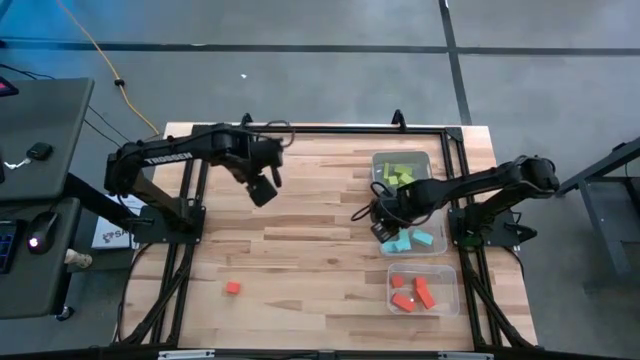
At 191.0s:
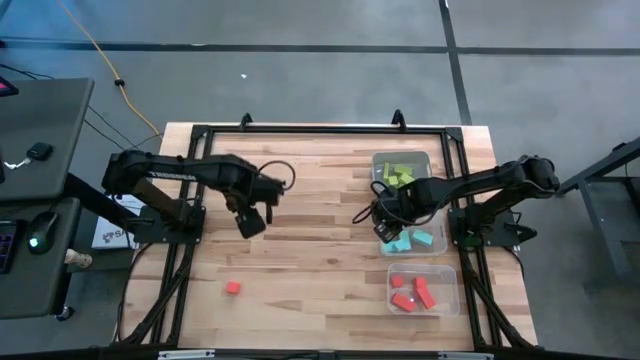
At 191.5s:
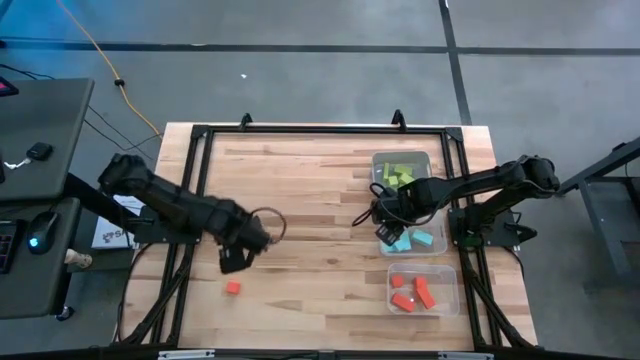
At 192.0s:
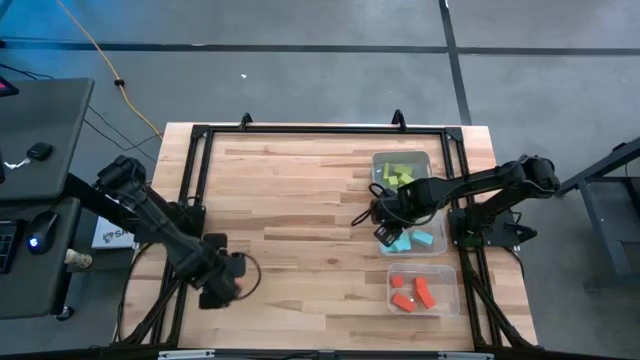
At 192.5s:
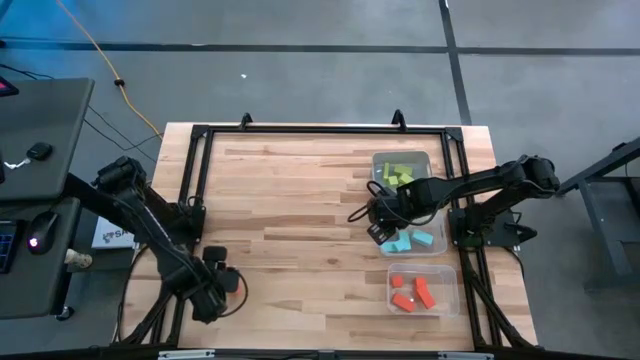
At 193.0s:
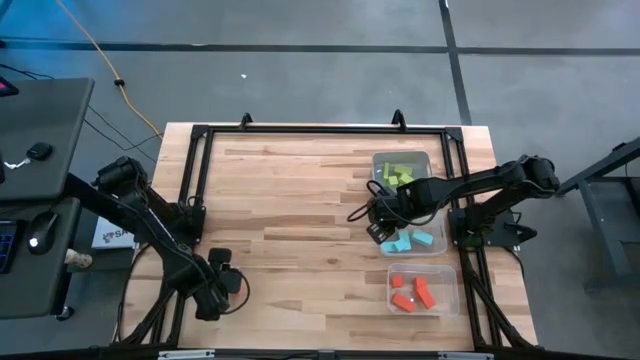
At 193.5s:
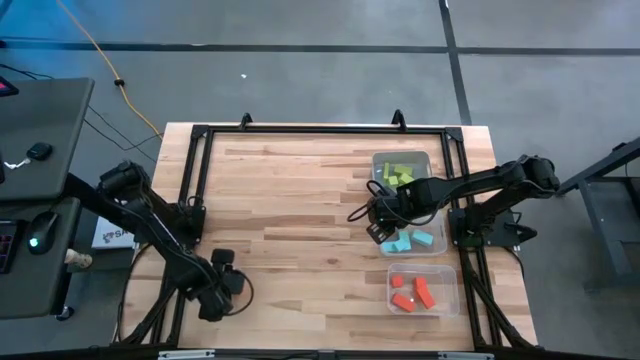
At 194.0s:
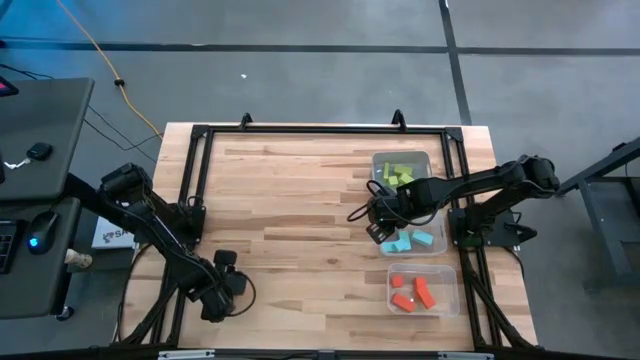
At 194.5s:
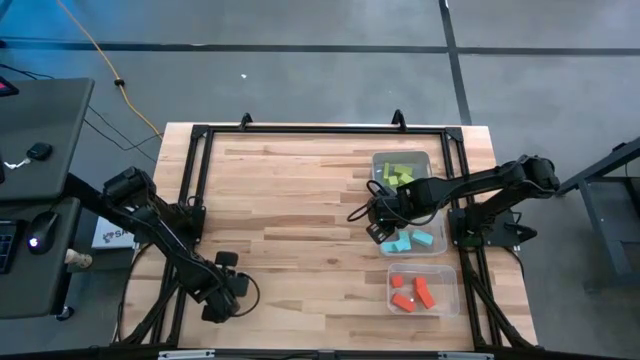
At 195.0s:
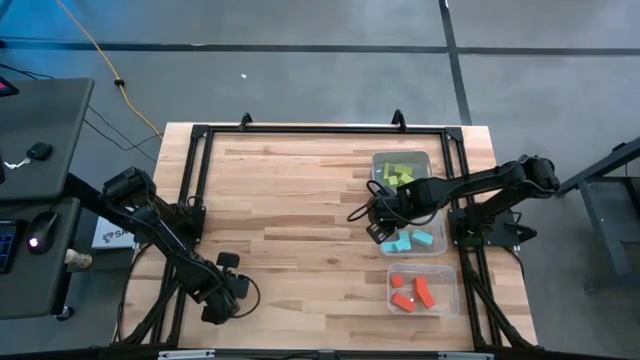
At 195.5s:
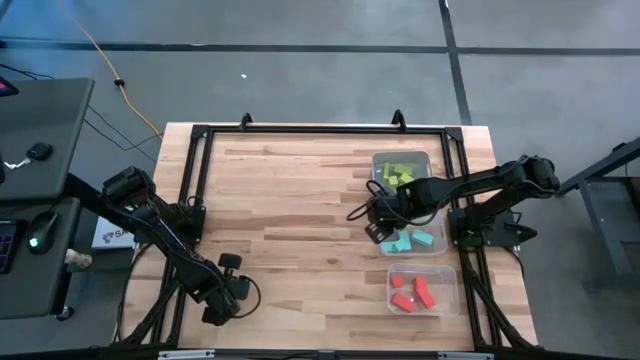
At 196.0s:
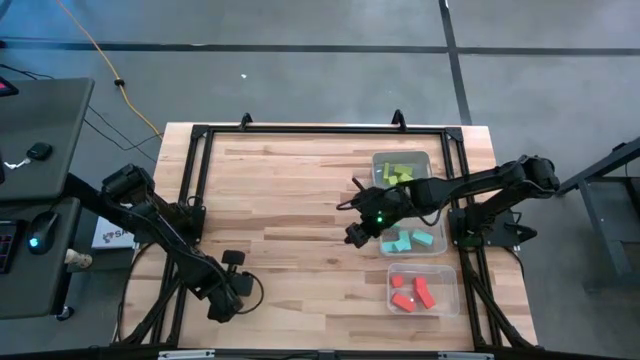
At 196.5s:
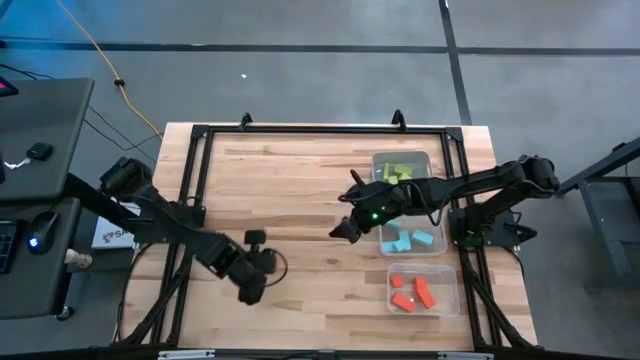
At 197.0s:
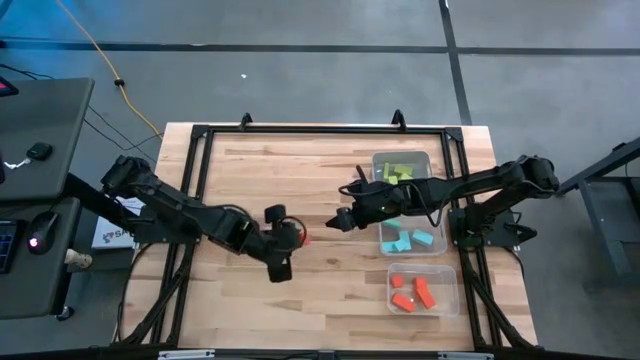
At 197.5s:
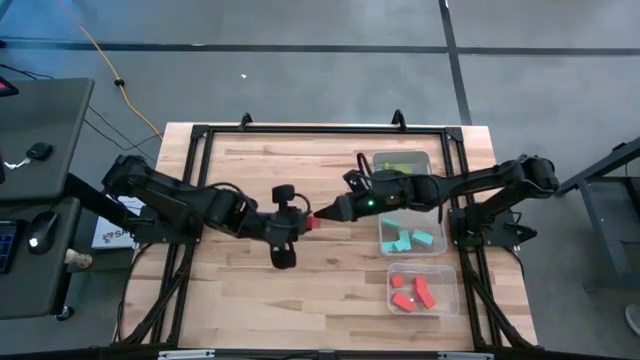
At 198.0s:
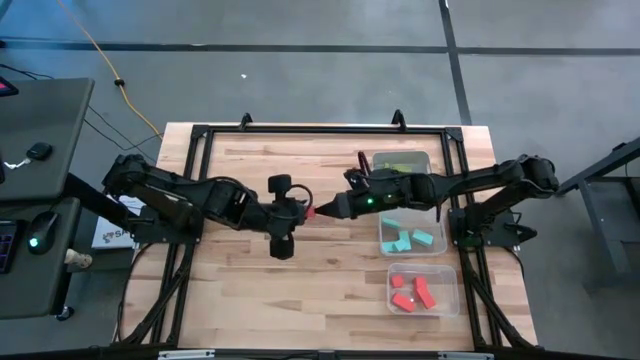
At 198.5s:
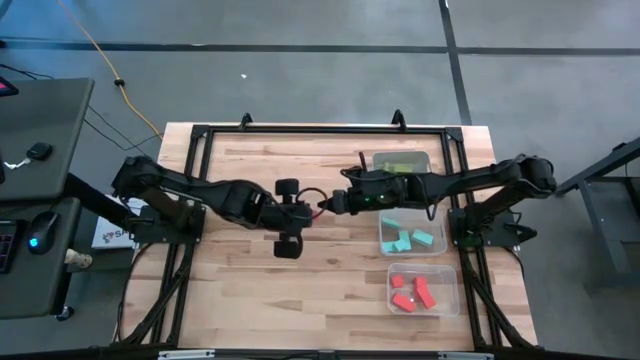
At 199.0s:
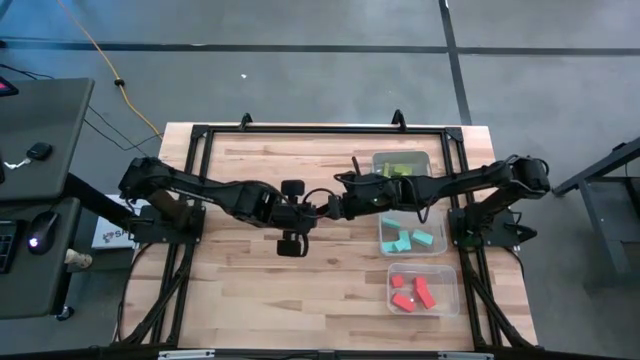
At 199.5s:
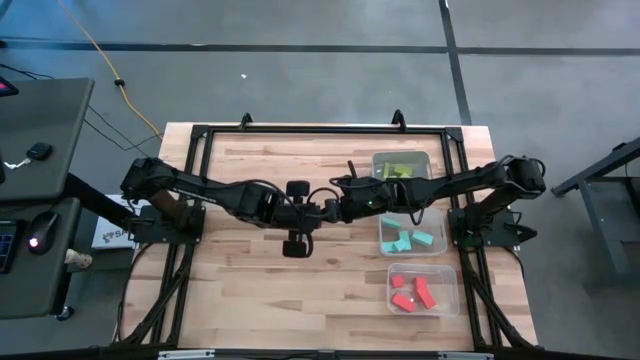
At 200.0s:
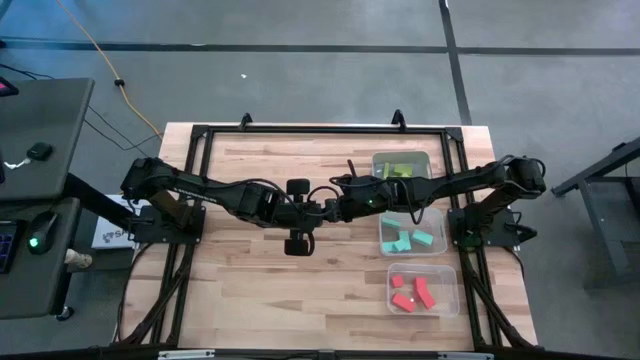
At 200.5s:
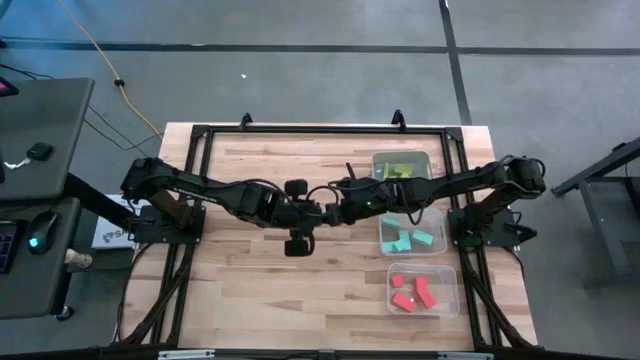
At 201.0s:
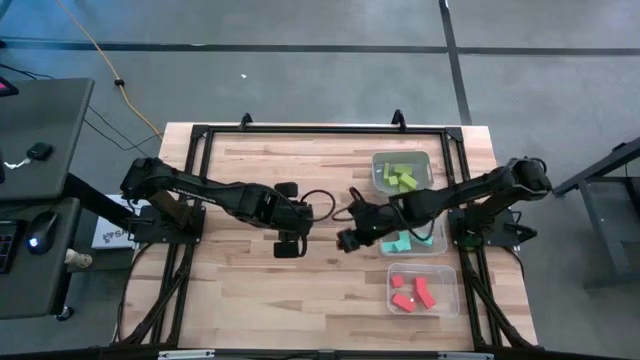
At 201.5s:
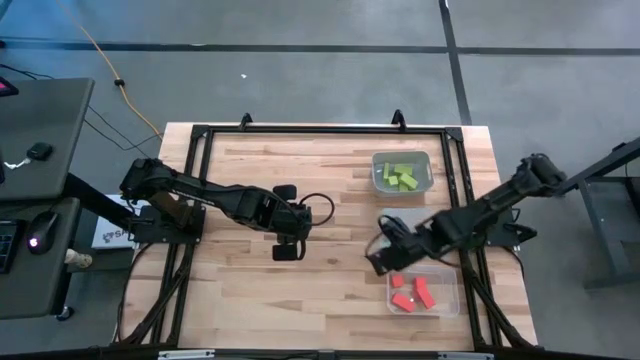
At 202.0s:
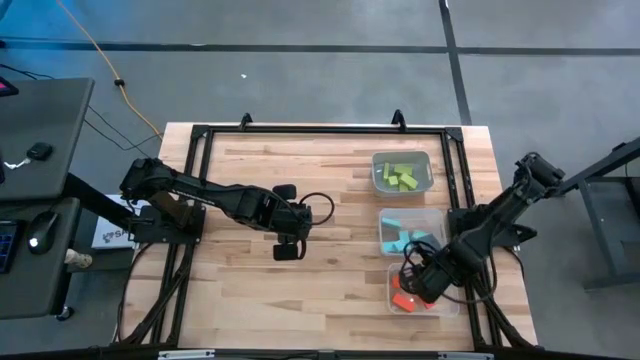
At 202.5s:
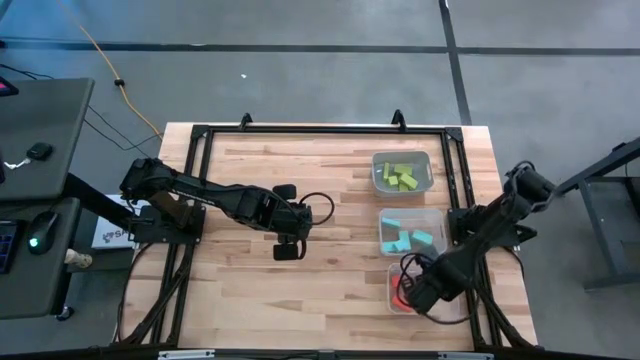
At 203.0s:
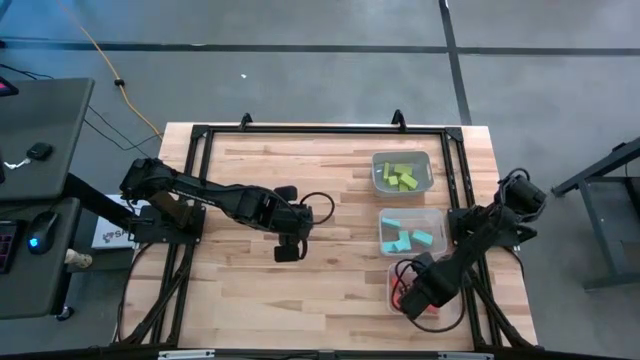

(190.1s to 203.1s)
Task: Sort & place blocks by color
Put the orange block into the bottom transparent bin

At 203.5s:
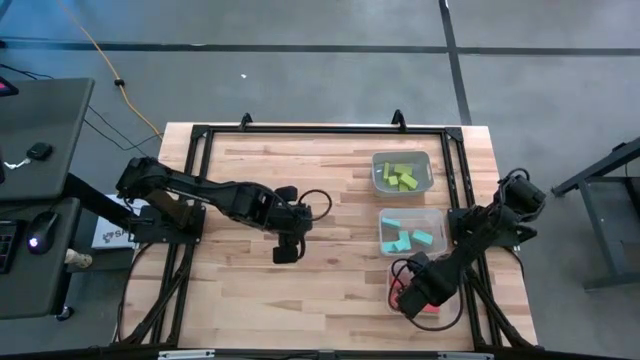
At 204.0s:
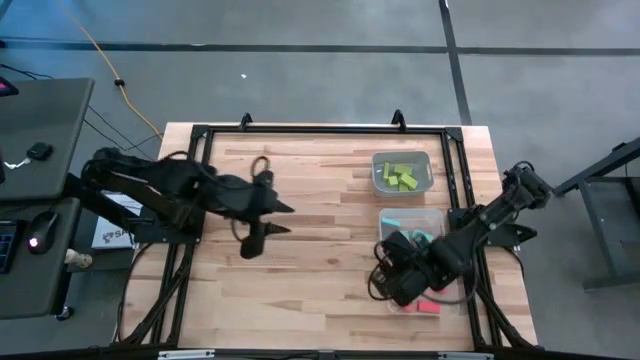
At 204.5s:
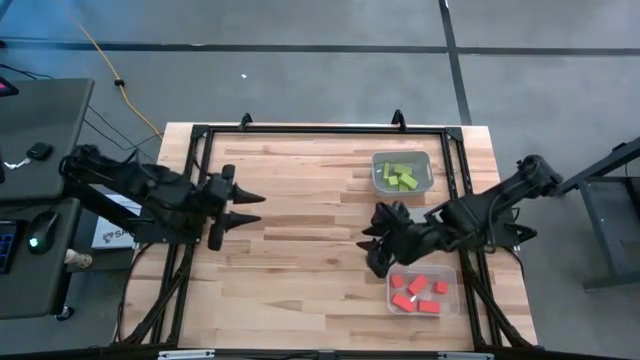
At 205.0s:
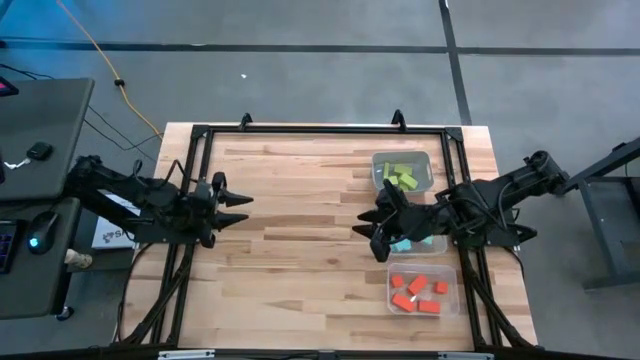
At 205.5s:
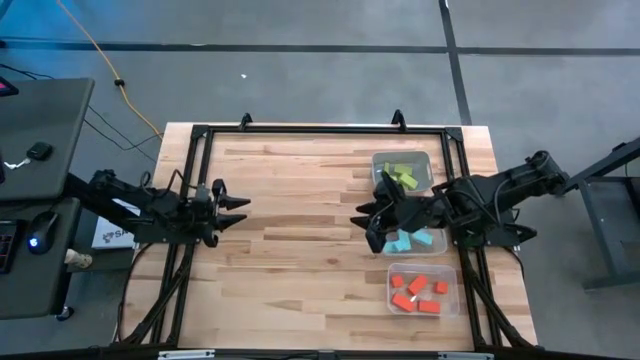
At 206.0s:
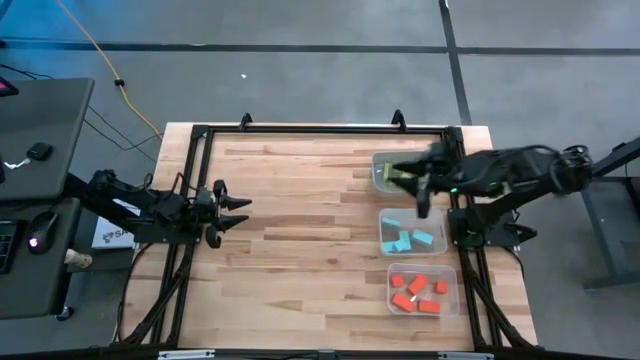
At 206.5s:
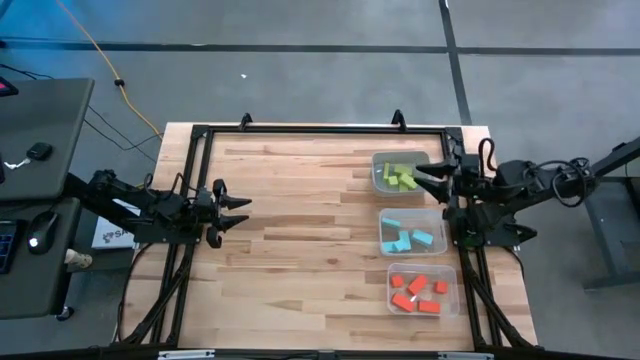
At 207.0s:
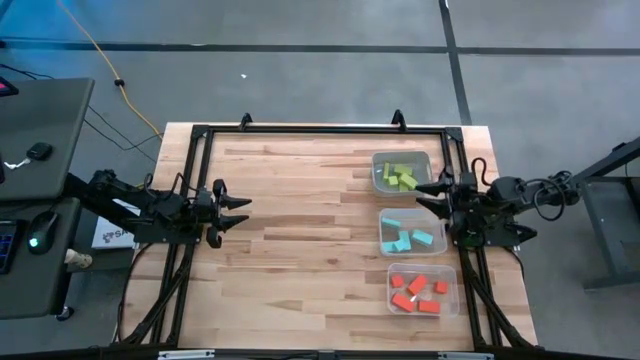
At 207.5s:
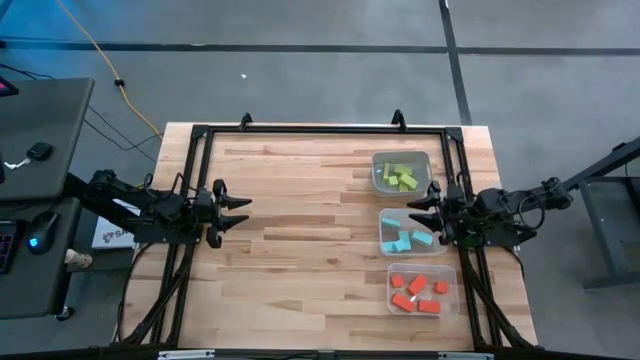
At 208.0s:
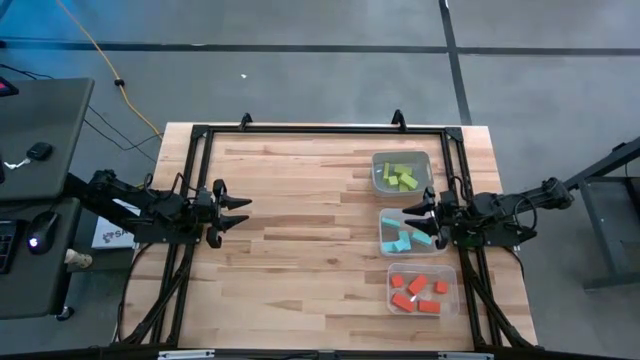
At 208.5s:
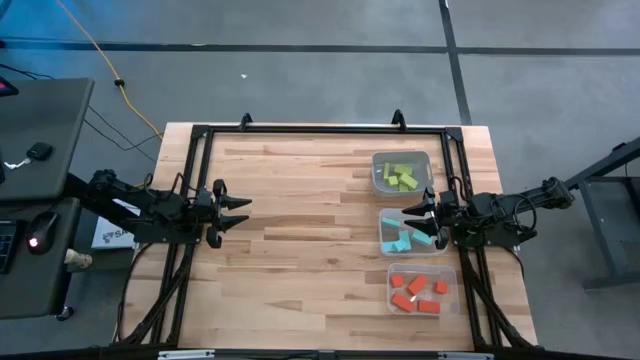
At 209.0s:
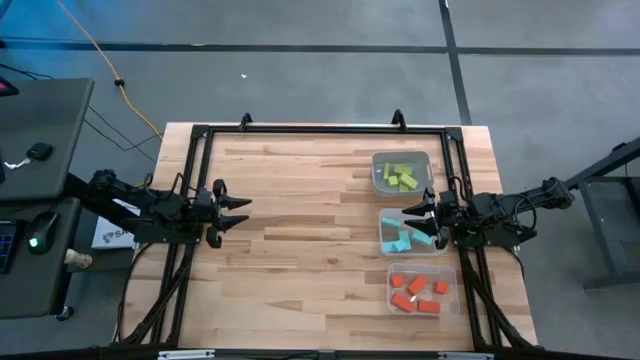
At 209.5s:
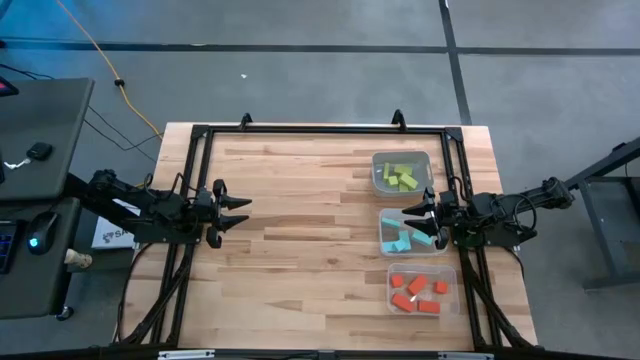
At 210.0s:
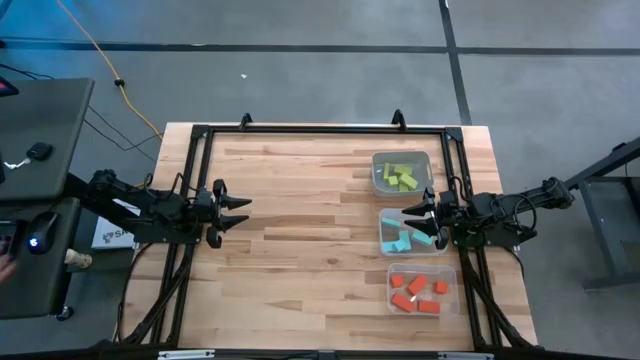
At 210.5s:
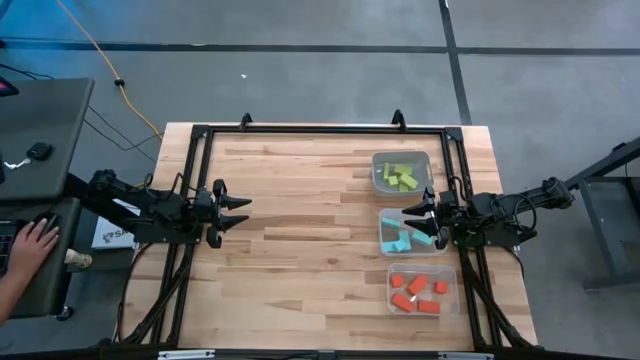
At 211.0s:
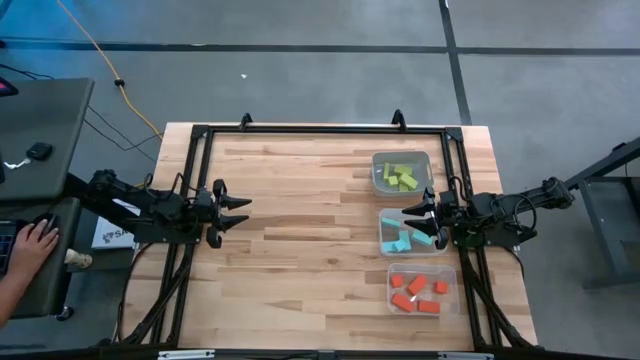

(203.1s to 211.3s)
Return to Home Position
